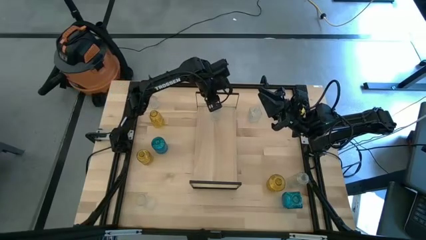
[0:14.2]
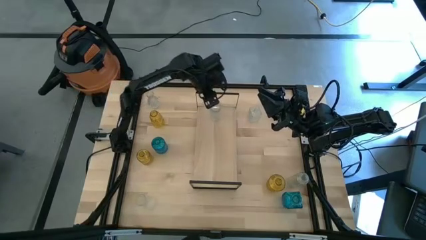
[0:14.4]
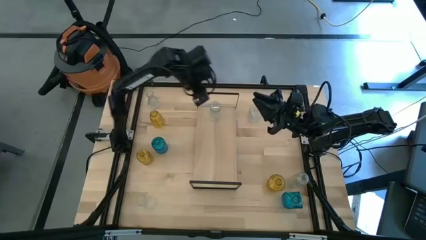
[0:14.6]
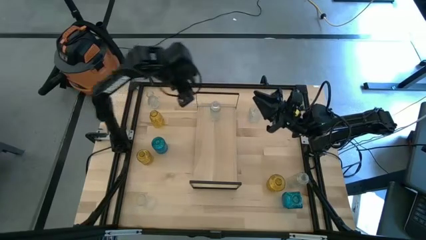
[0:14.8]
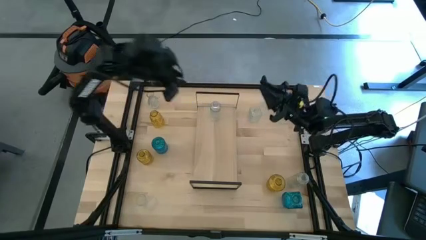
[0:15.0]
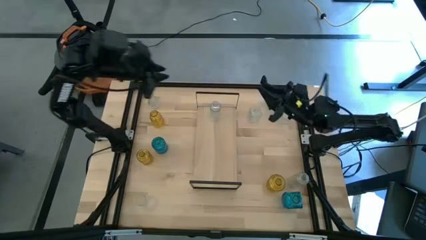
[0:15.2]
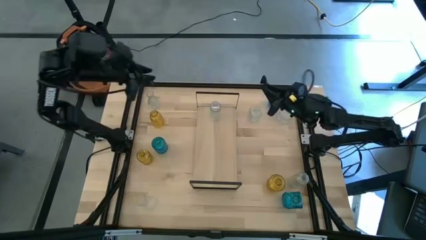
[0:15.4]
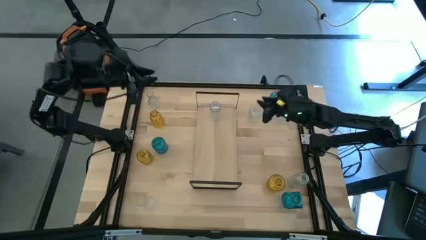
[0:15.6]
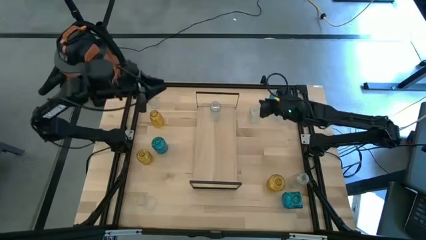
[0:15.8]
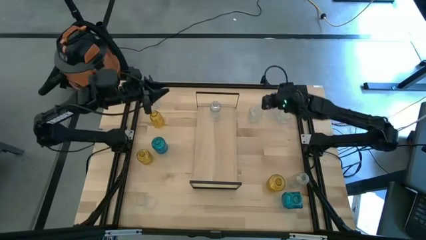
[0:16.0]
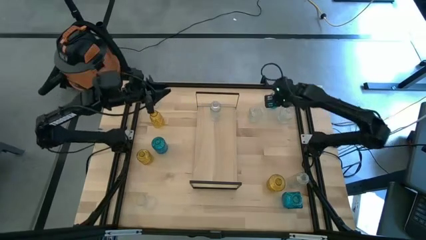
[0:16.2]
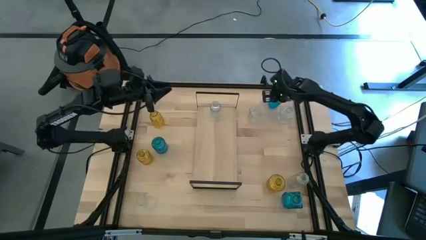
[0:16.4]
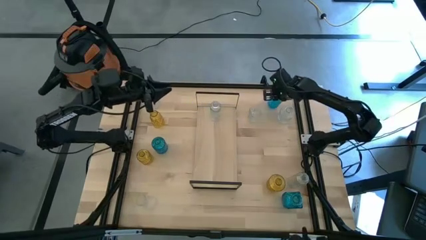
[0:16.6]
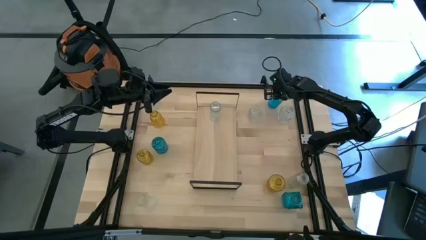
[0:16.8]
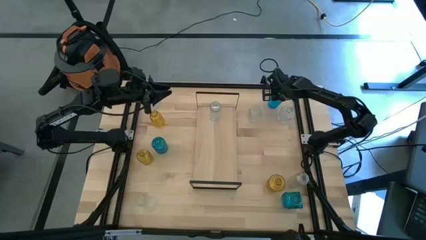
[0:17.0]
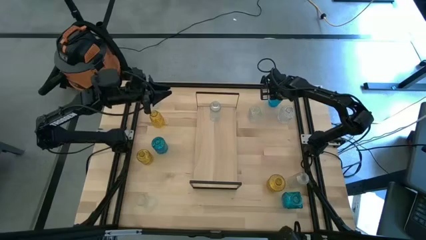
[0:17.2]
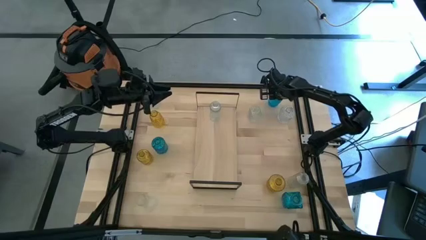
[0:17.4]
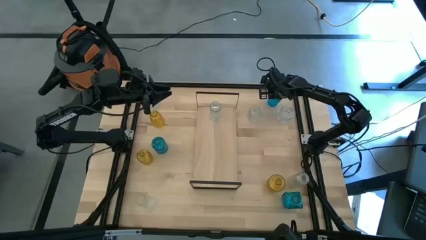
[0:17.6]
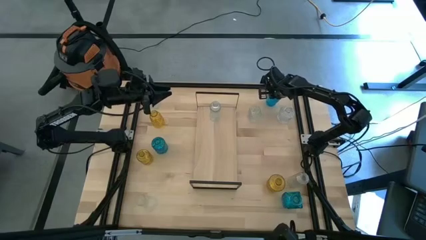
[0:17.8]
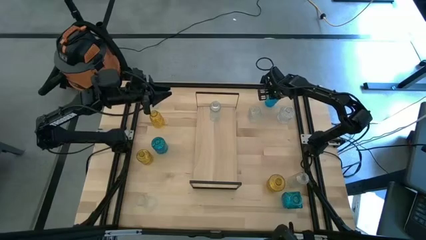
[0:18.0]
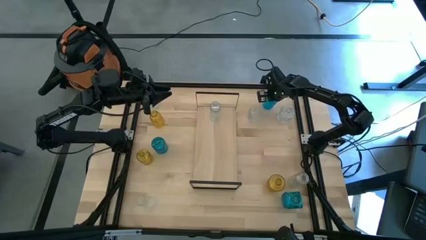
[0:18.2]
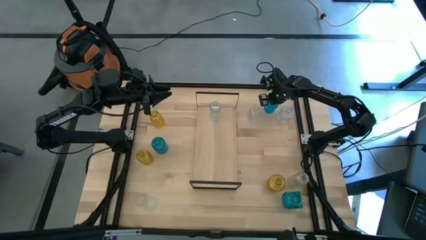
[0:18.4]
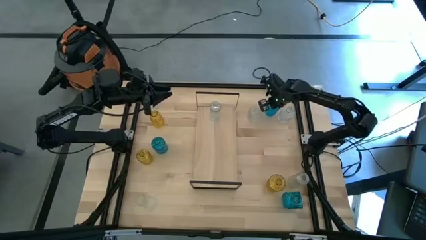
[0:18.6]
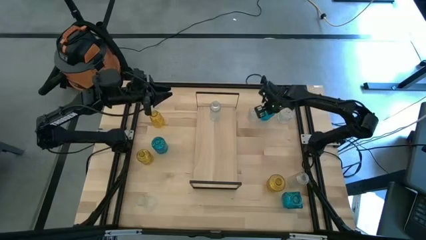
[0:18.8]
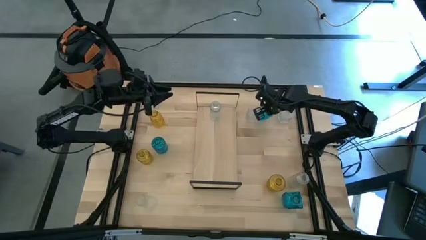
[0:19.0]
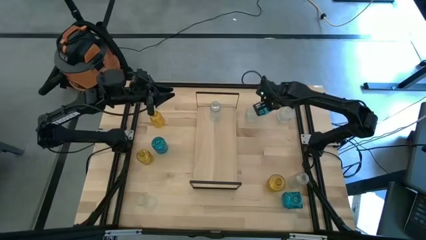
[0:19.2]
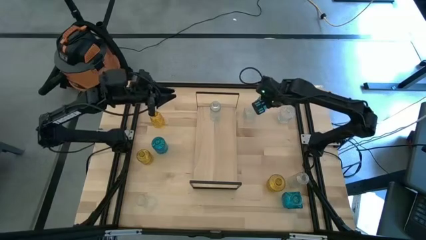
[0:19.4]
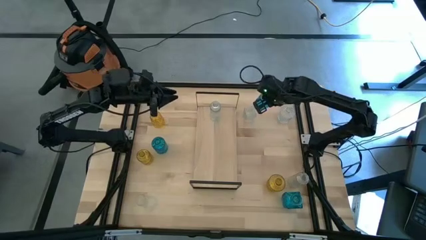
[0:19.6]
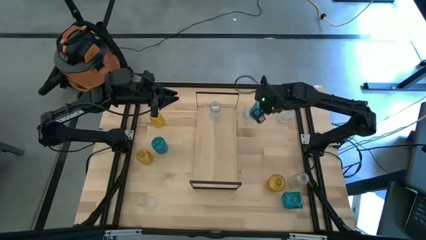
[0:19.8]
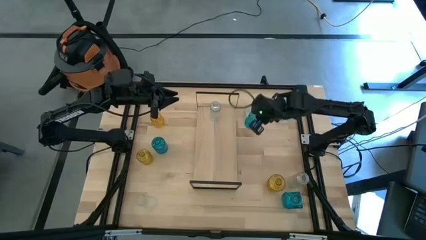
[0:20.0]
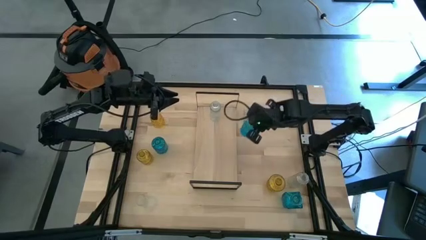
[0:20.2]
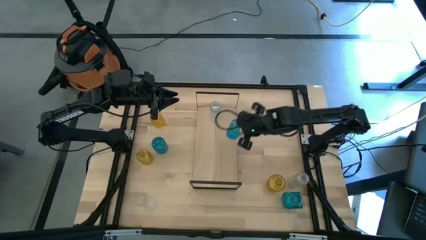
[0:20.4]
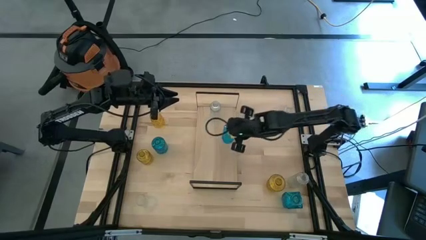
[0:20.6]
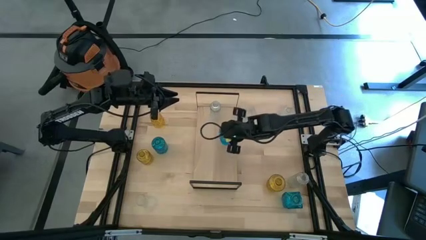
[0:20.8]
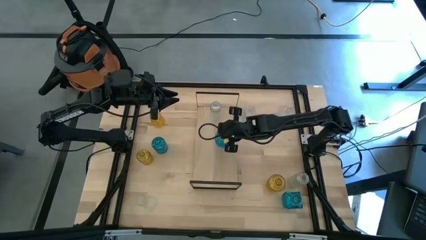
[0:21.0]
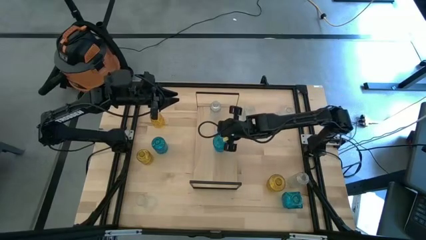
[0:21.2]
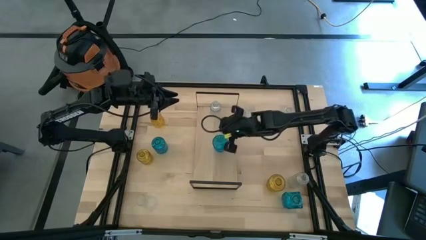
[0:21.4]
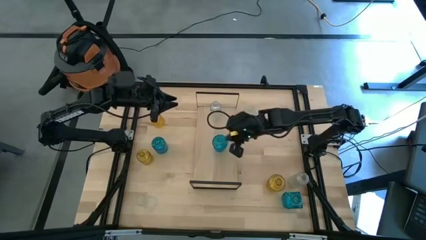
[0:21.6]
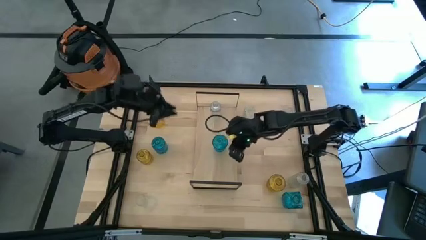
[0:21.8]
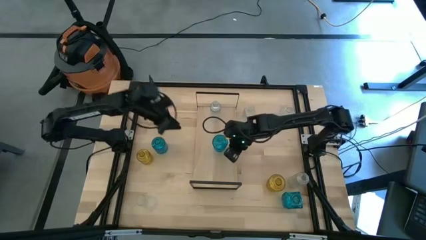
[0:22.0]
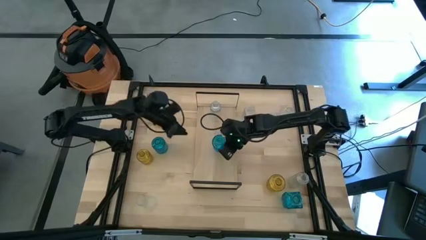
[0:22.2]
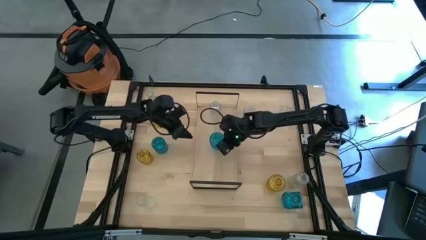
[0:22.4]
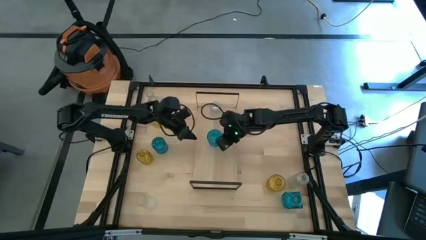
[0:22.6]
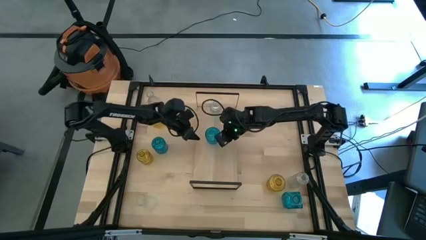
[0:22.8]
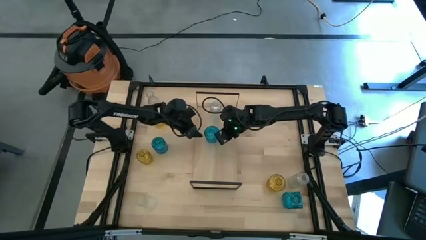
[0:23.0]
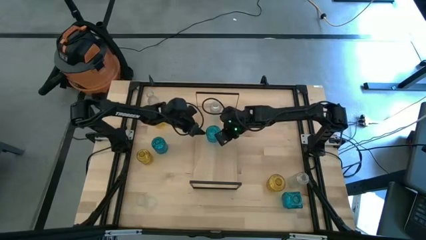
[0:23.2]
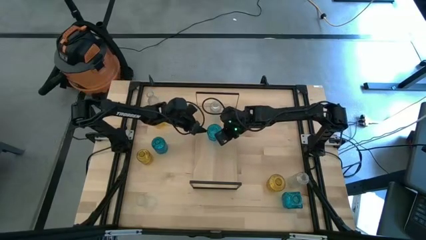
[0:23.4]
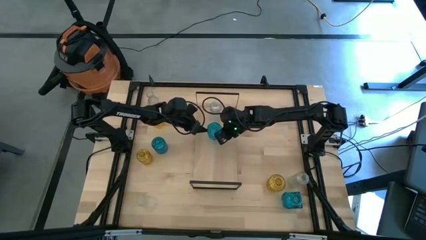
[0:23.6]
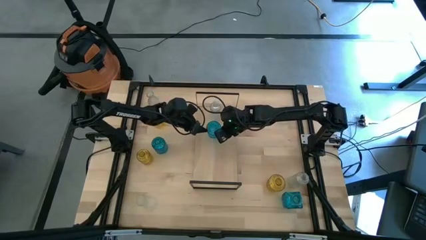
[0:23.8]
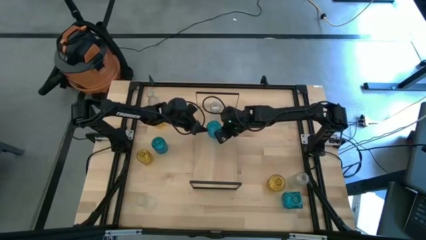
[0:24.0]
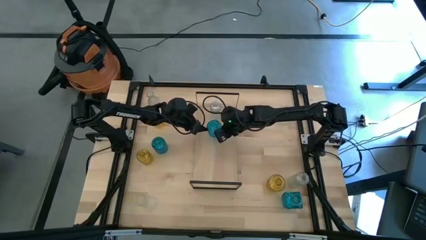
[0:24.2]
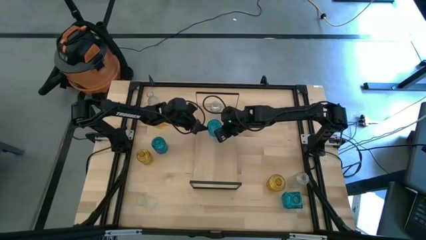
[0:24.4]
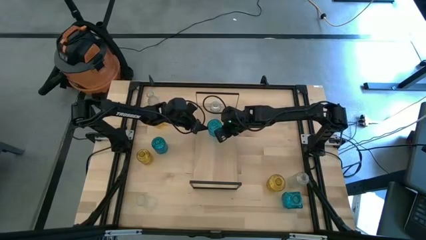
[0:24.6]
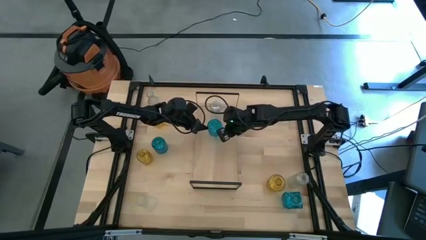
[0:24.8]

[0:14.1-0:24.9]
Task: sort vases onto shelf
Put the blue vase on the shelf

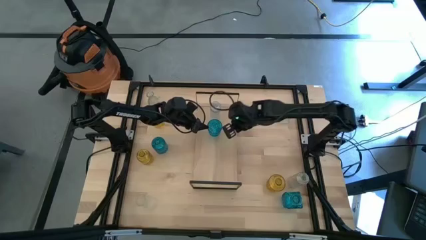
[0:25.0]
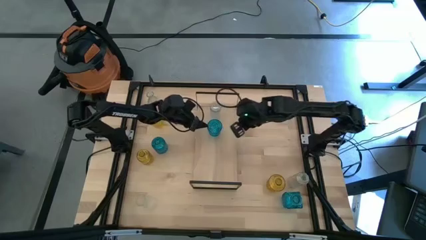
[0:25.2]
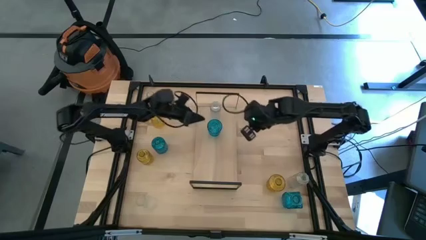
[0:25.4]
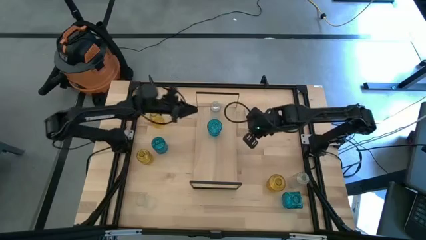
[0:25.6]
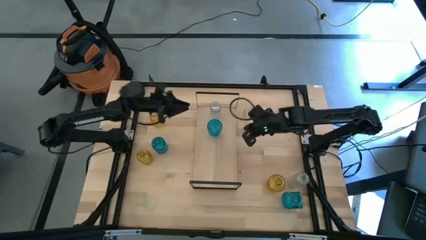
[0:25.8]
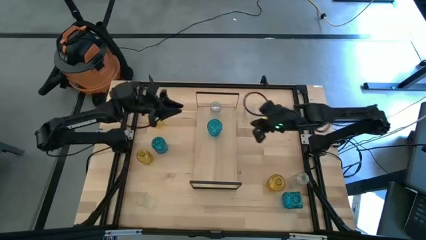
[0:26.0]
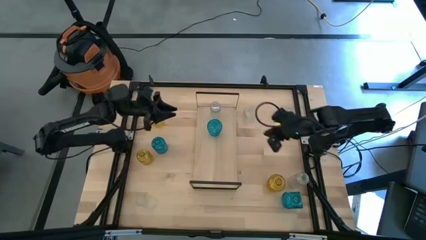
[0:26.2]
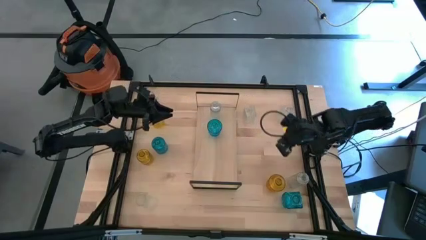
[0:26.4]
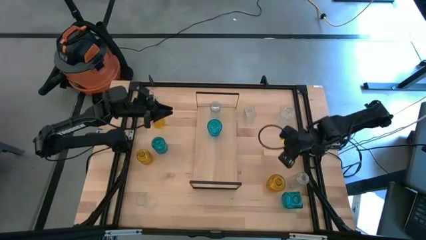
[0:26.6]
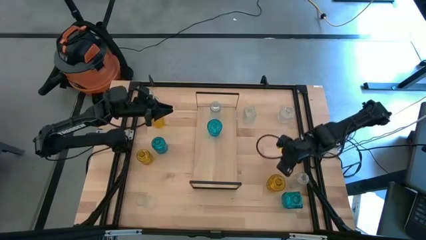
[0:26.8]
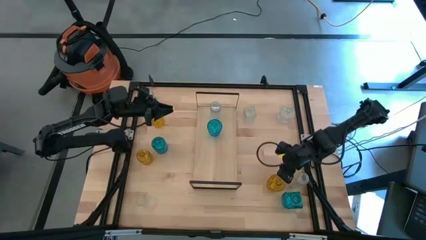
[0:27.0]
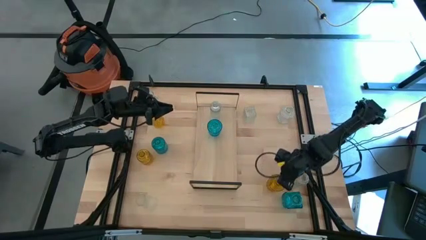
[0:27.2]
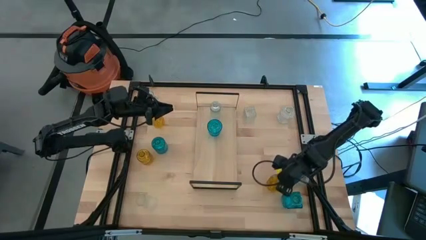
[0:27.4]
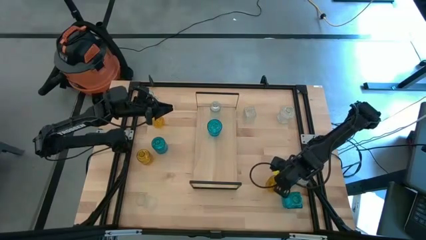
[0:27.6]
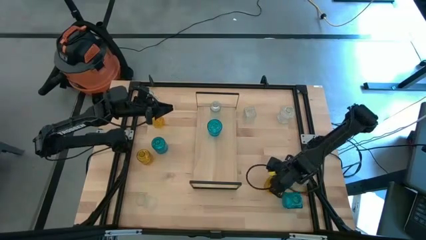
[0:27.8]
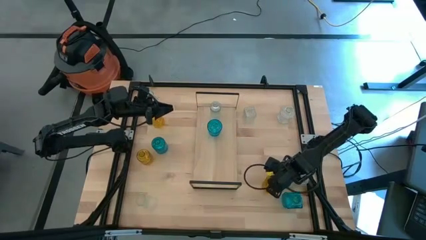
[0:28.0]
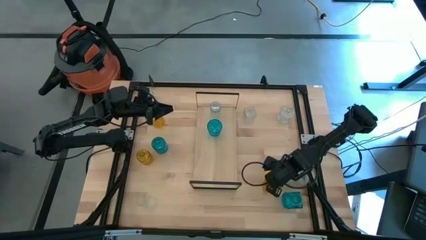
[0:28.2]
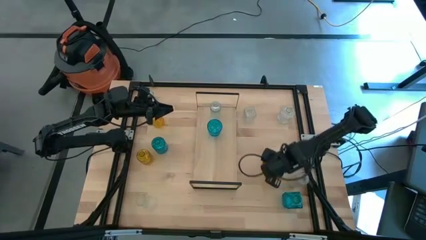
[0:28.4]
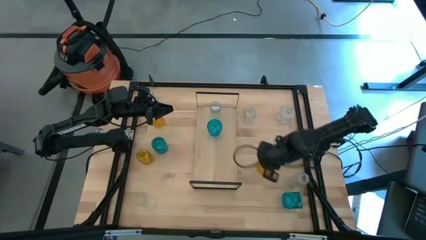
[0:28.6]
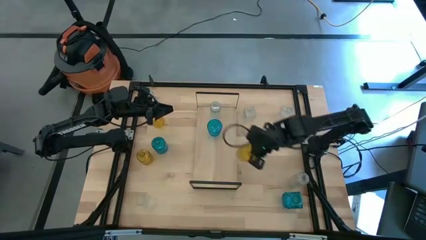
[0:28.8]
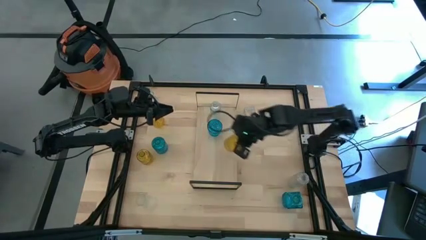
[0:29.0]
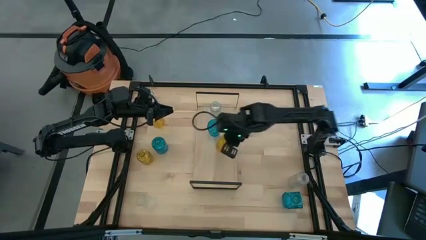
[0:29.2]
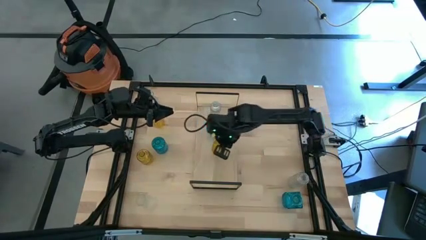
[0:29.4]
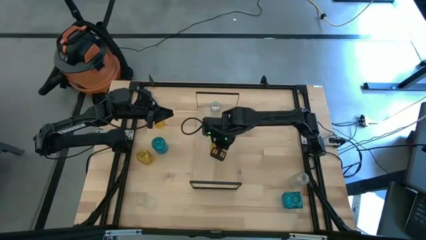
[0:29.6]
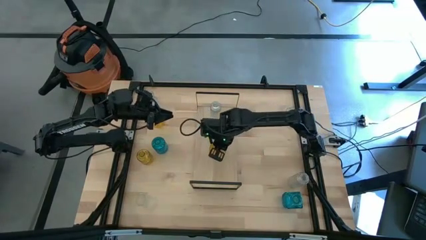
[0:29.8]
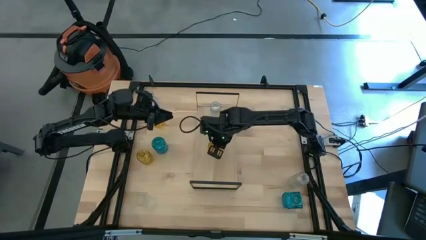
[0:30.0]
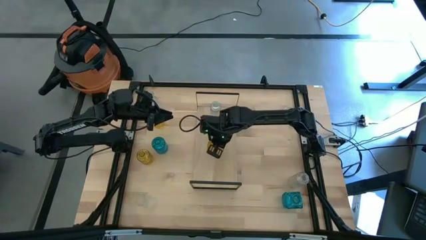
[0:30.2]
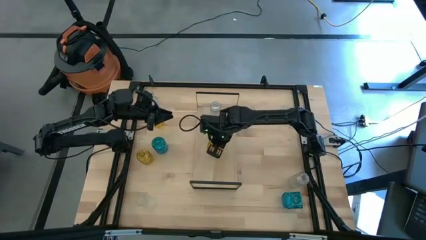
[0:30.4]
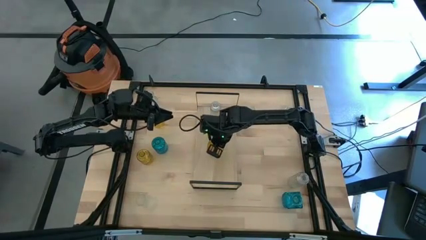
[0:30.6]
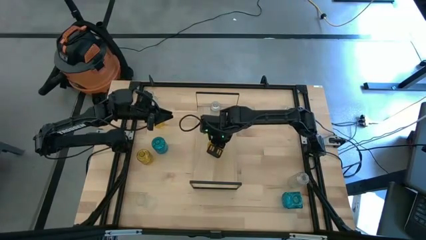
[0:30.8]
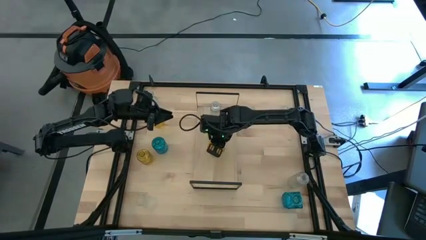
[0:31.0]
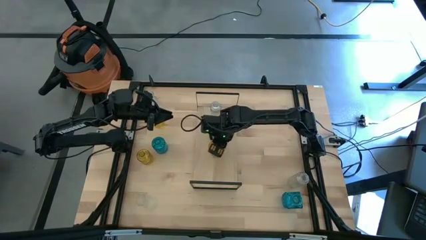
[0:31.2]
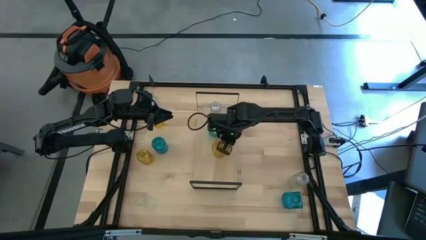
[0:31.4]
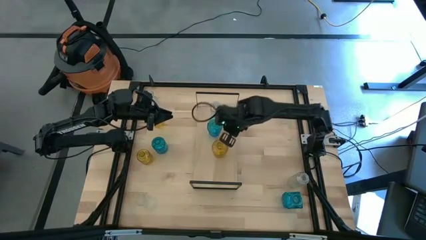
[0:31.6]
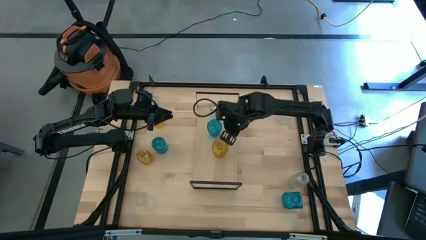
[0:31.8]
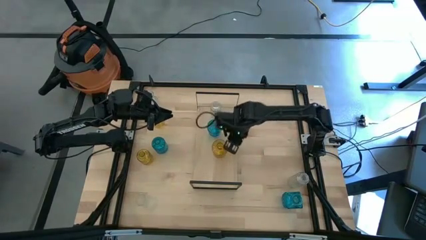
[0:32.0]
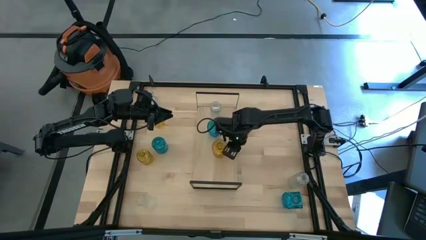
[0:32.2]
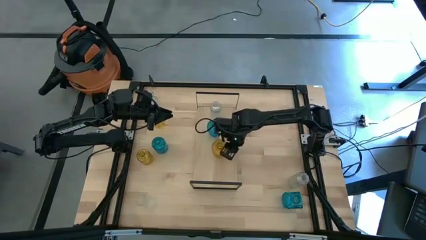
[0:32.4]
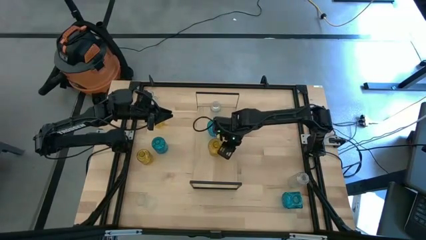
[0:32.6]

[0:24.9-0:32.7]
Put the yellow vase on the shelf
